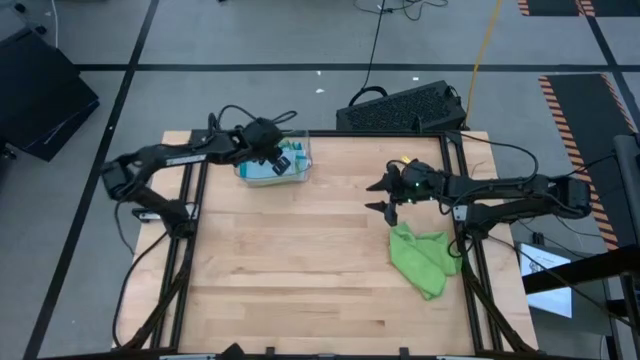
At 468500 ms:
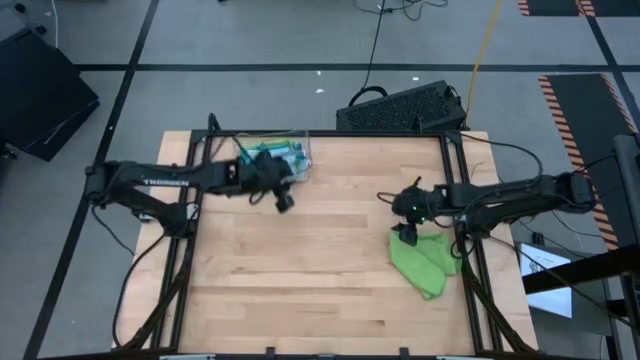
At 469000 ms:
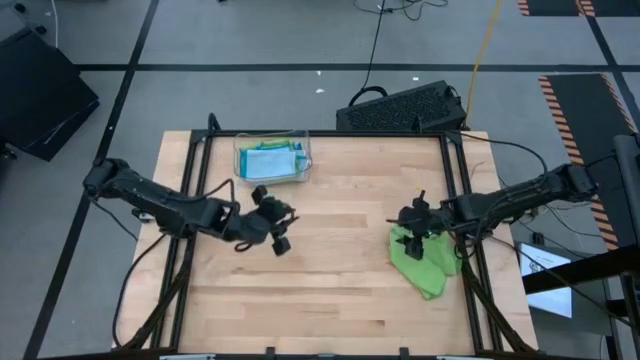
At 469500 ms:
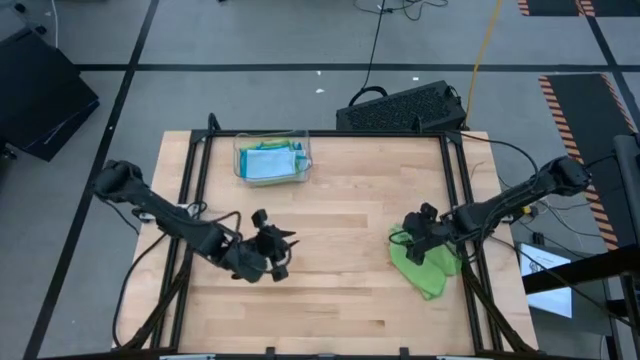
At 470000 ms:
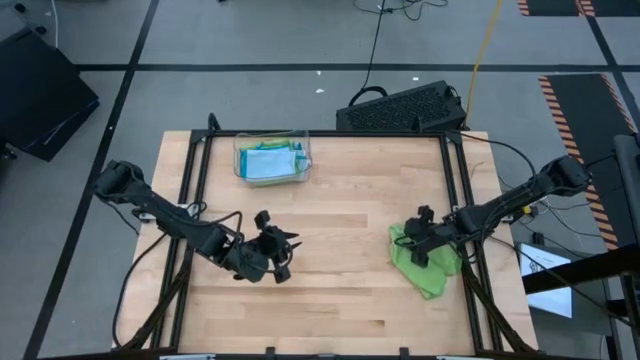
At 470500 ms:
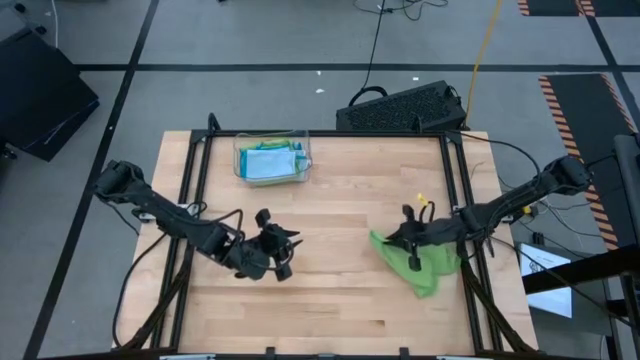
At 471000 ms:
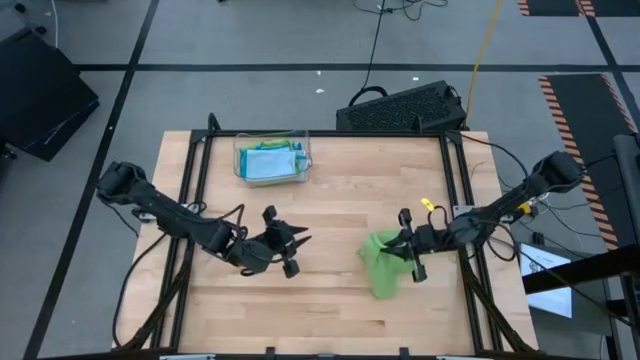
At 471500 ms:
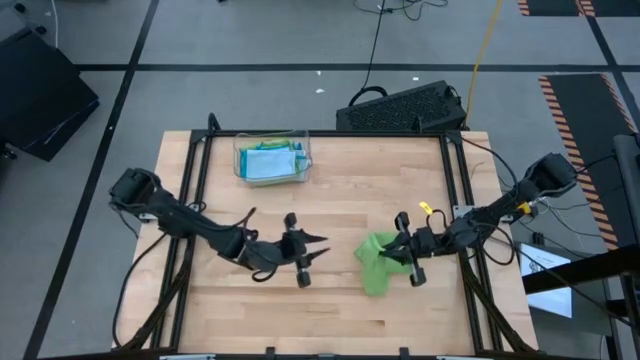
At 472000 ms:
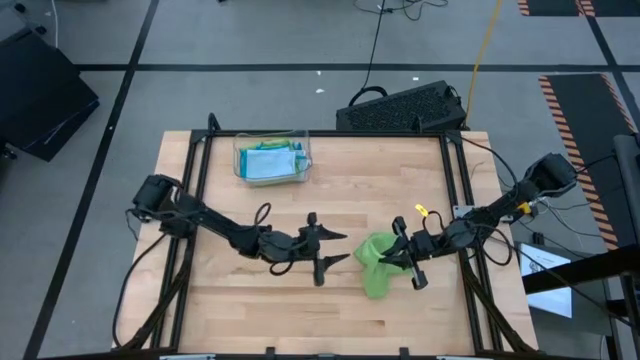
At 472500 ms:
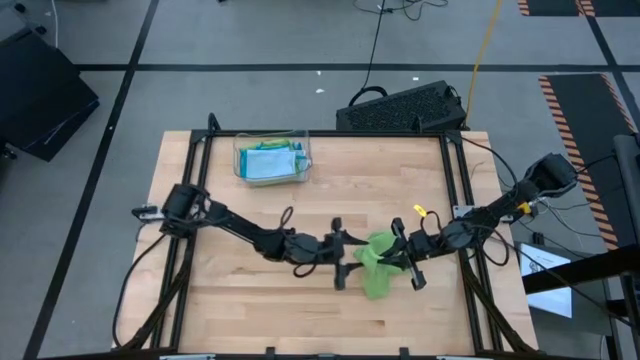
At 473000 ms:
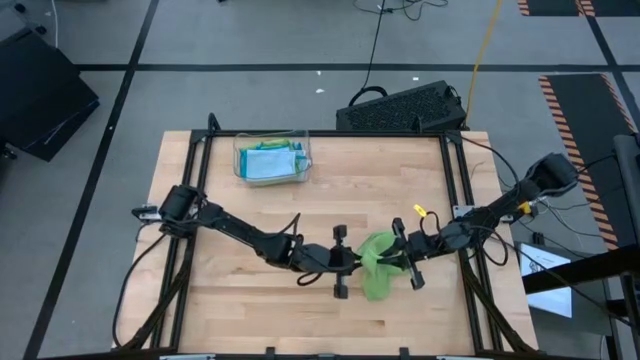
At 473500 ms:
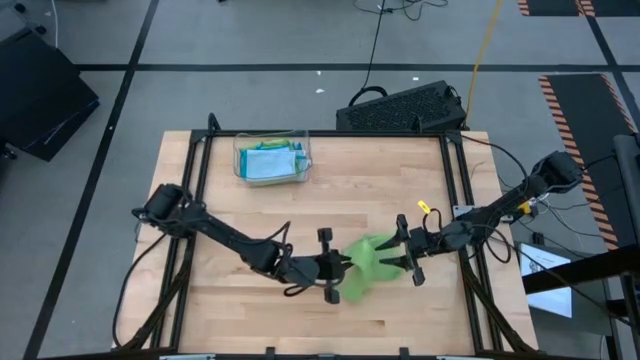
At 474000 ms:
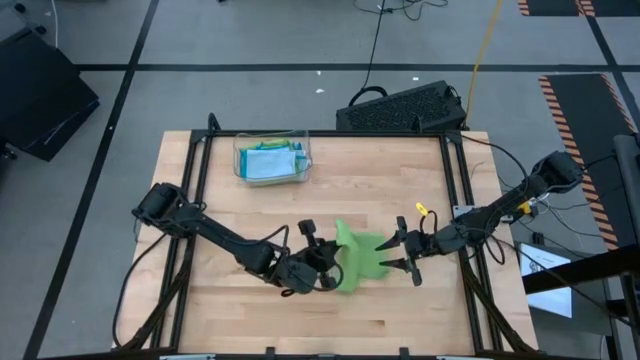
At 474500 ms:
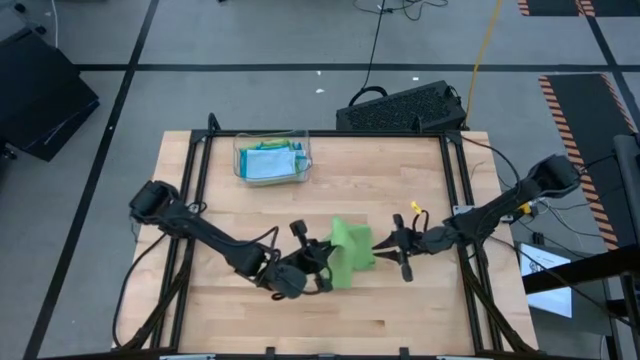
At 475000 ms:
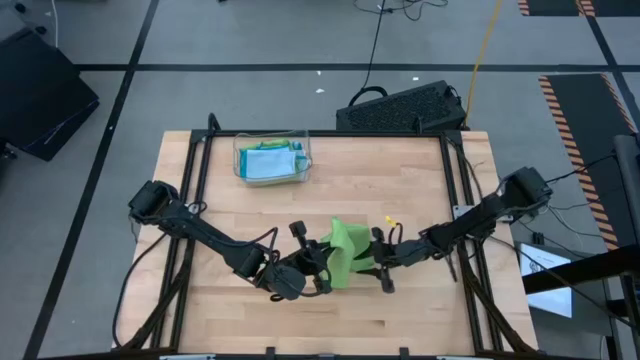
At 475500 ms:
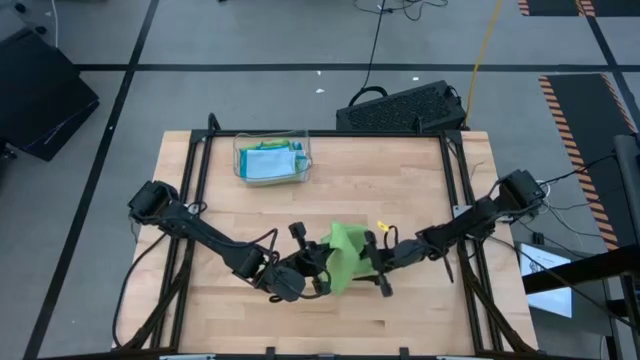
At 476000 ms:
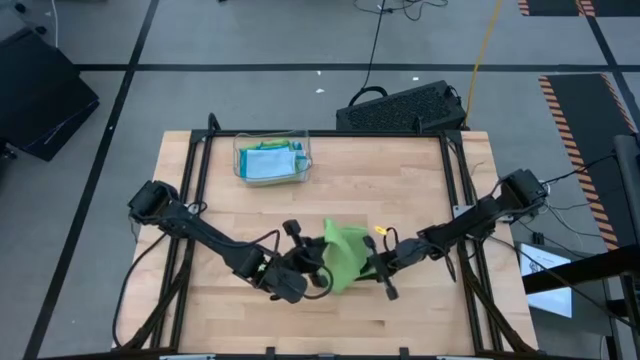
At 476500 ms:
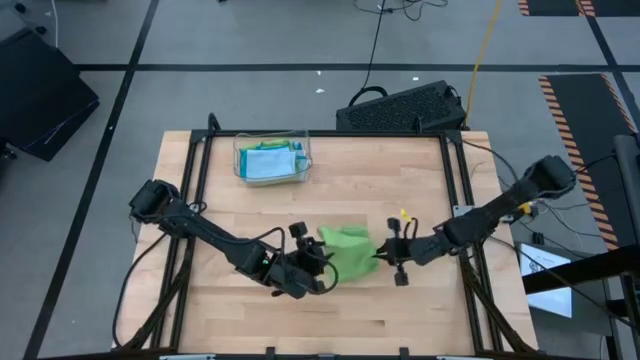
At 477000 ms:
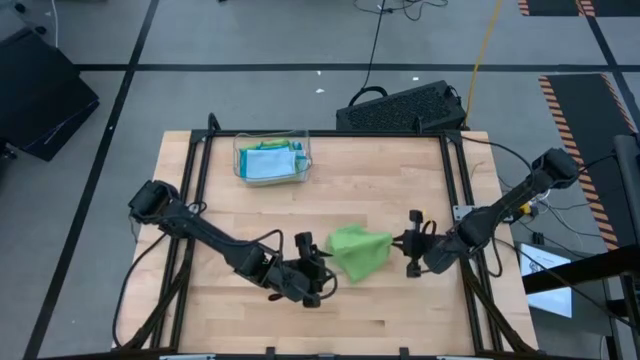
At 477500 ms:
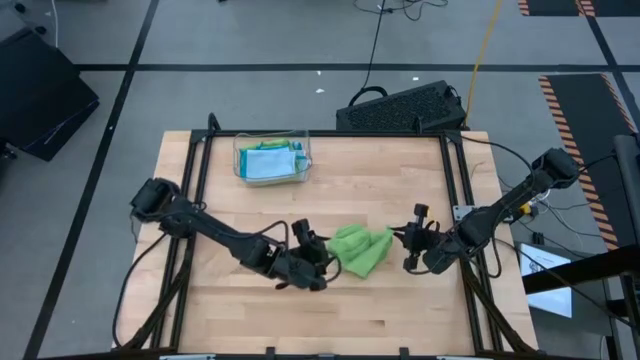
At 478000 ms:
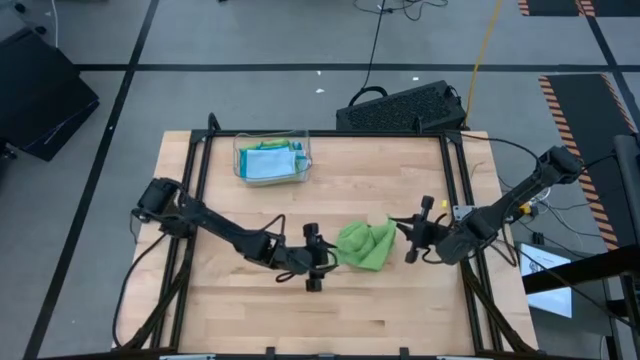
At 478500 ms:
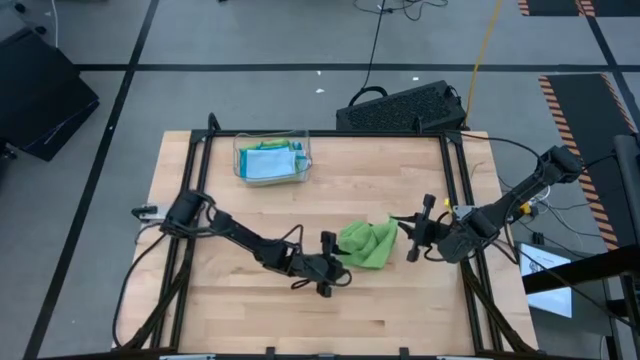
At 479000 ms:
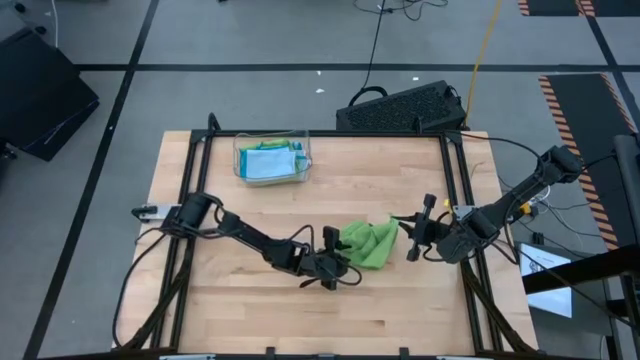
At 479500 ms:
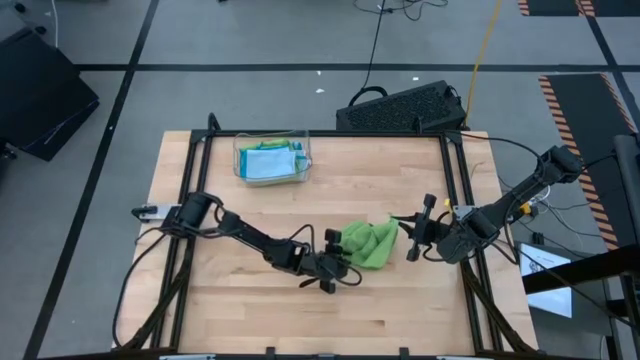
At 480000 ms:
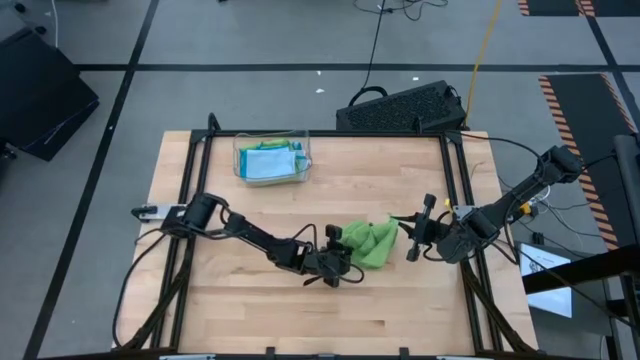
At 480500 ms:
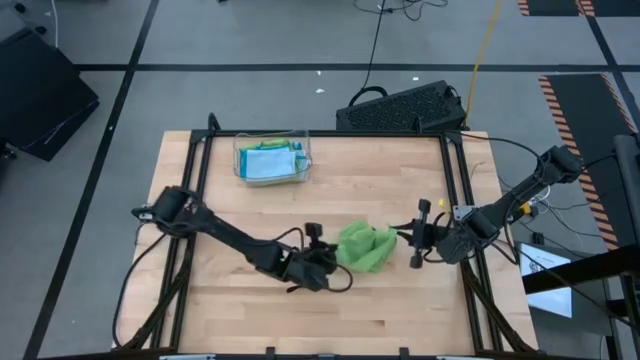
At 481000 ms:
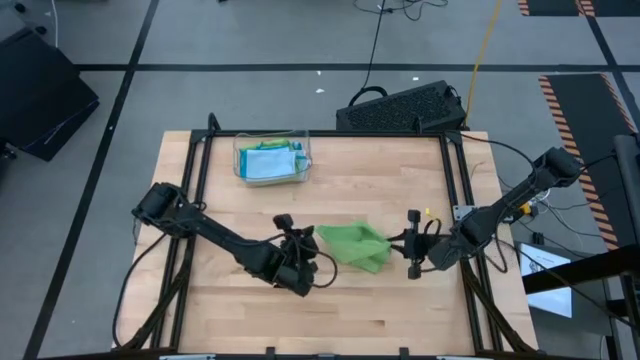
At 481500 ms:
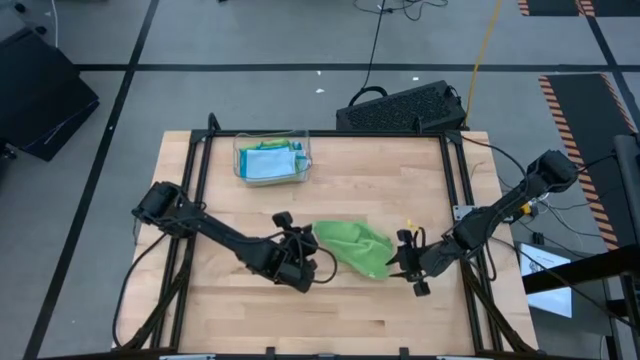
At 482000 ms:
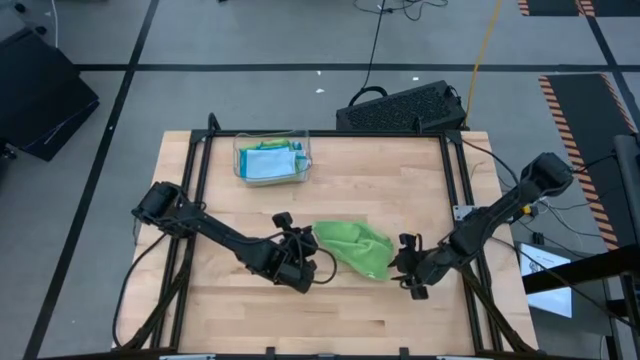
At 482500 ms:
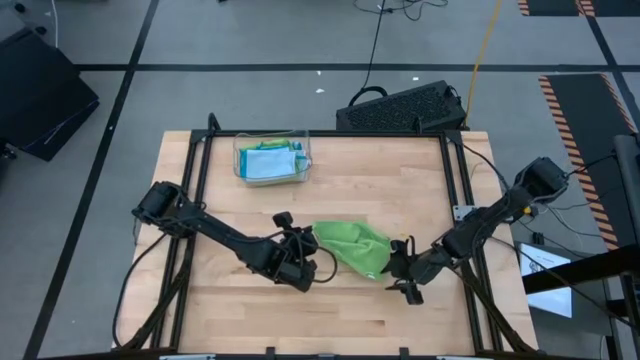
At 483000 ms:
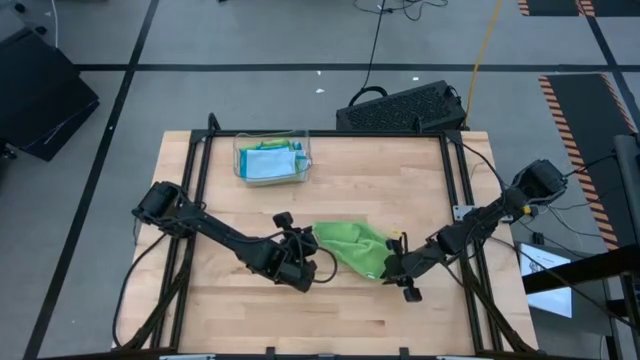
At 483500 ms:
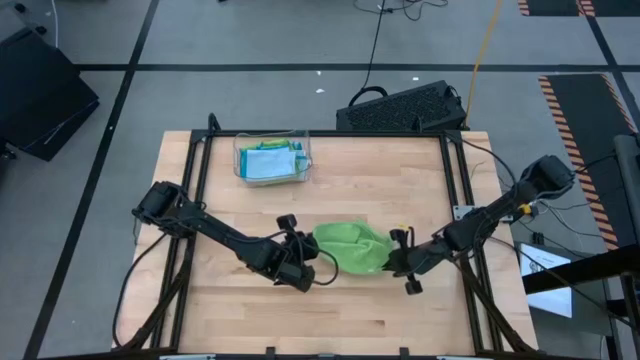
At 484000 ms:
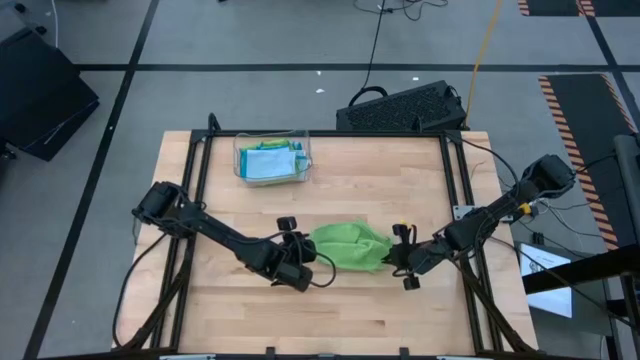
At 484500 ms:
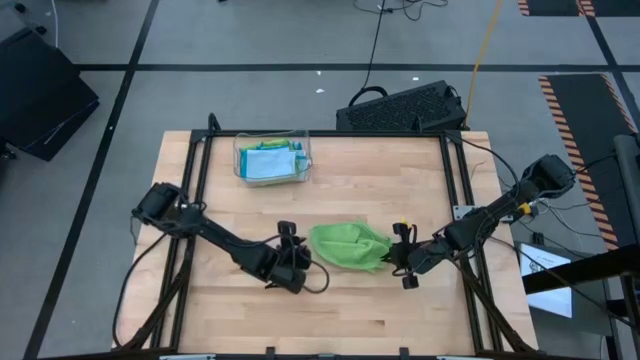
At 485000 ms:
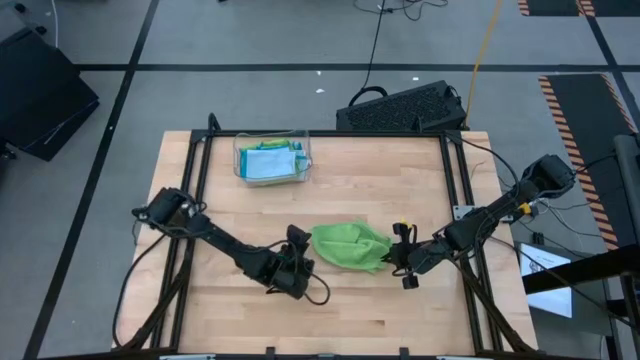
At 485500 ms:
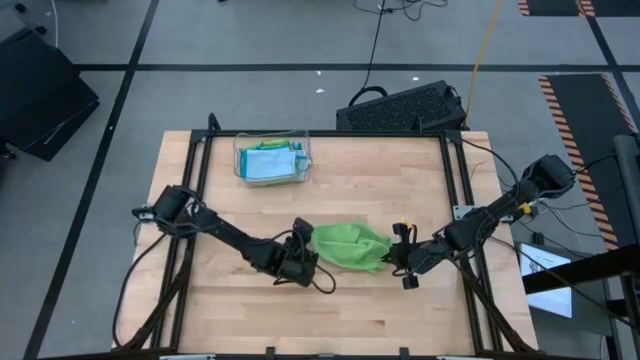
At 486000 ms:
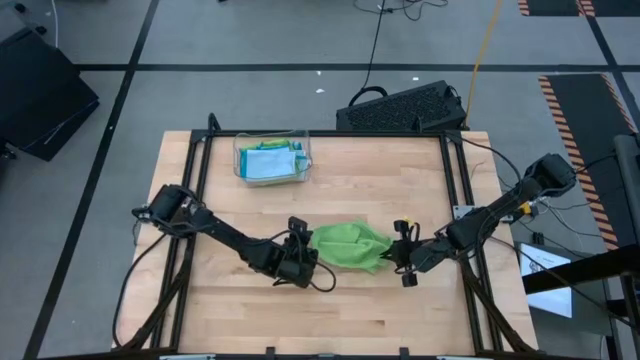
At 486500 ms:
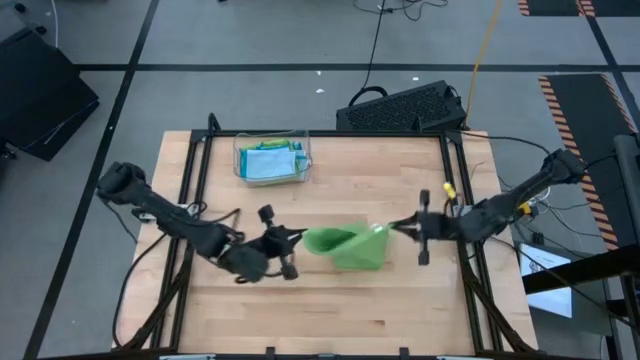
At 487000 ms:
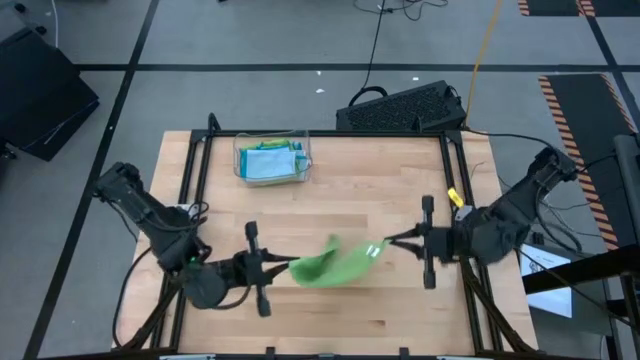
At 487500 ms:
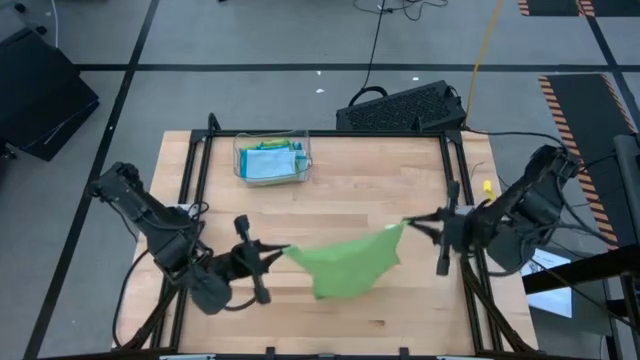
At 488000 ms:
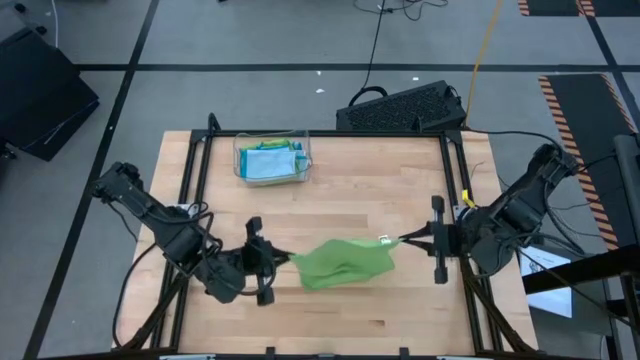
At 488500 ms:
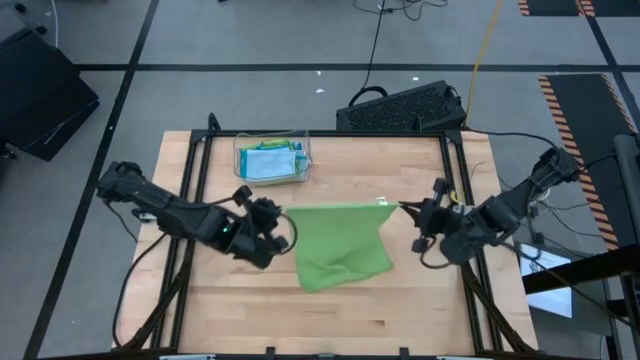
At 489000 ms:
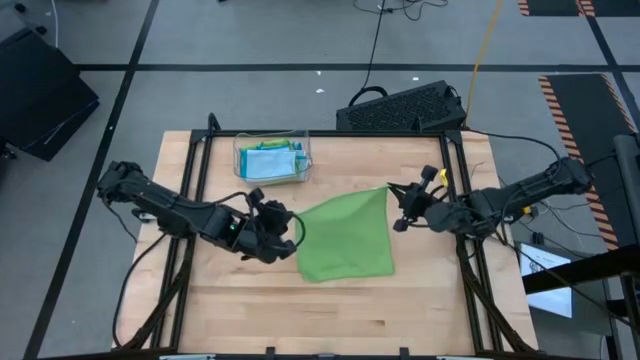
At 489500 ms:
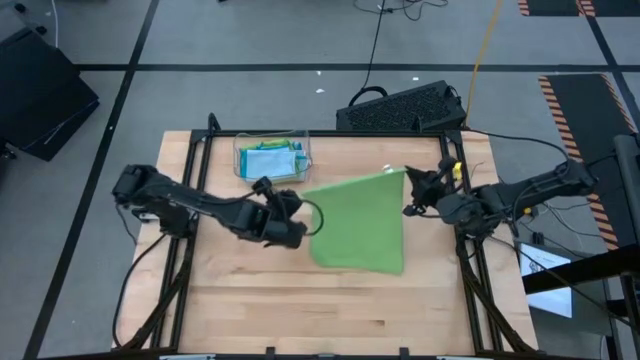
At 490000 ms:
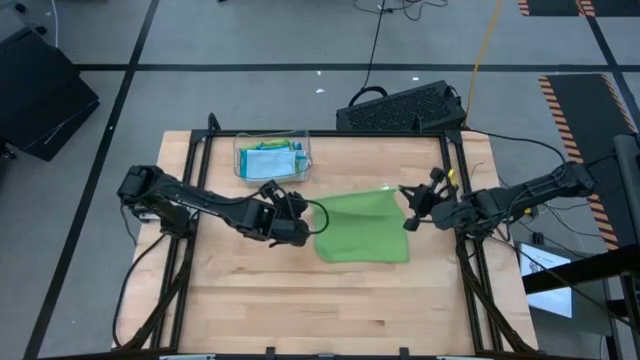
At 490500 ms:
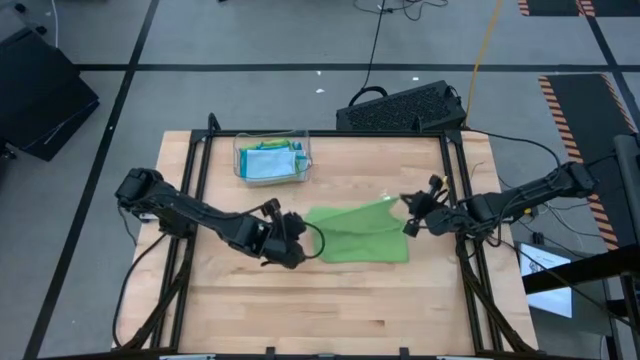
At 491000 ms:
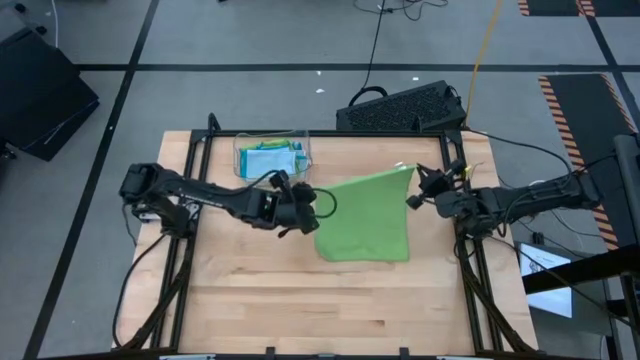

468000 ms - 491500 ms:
Task: Fold microfiber towels
Fold the green microfiber cloth
